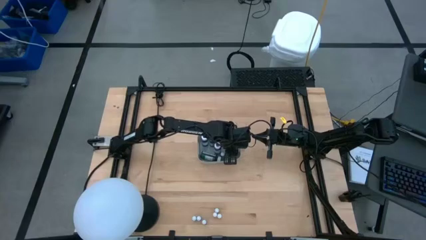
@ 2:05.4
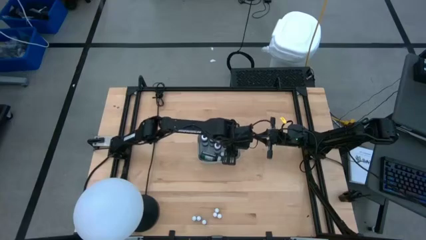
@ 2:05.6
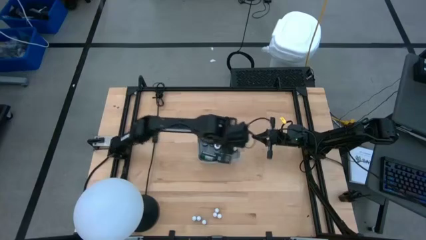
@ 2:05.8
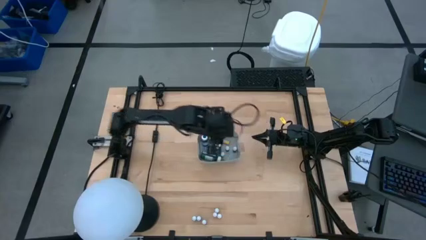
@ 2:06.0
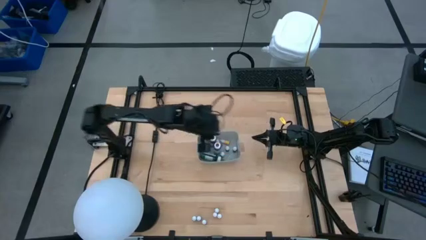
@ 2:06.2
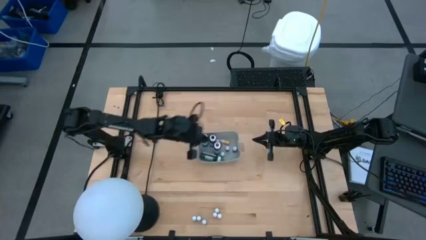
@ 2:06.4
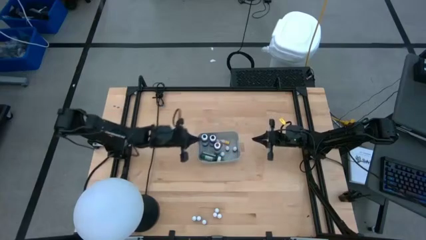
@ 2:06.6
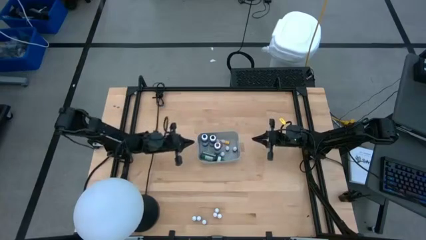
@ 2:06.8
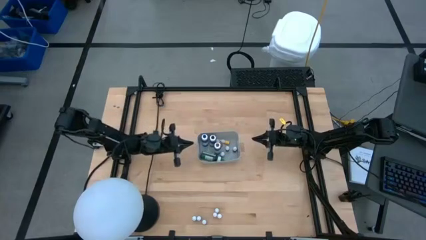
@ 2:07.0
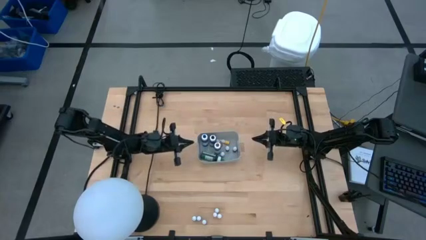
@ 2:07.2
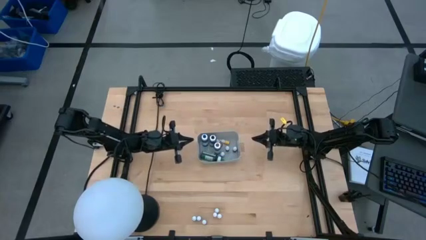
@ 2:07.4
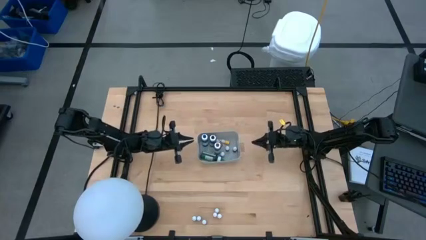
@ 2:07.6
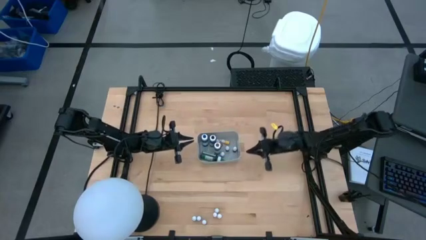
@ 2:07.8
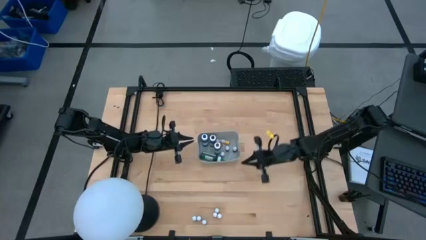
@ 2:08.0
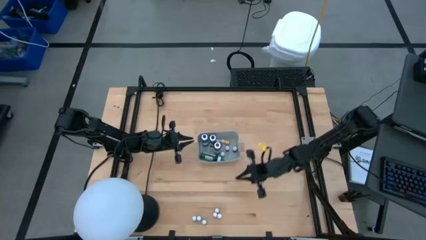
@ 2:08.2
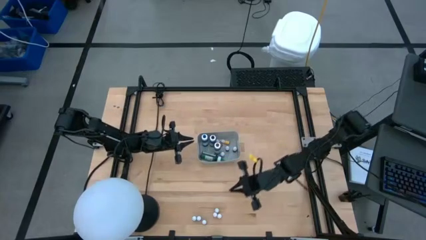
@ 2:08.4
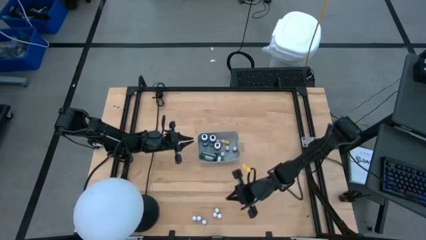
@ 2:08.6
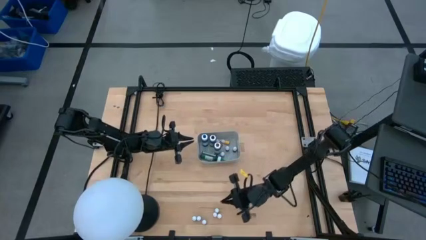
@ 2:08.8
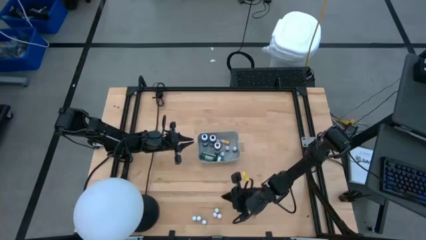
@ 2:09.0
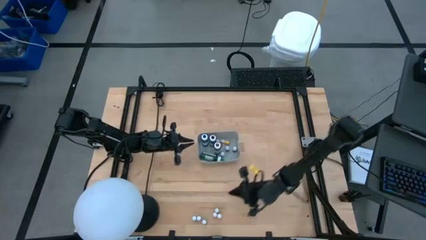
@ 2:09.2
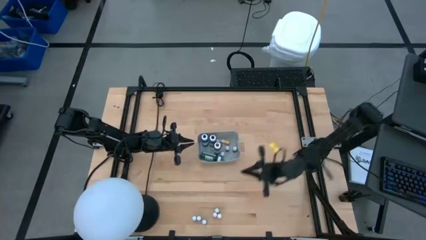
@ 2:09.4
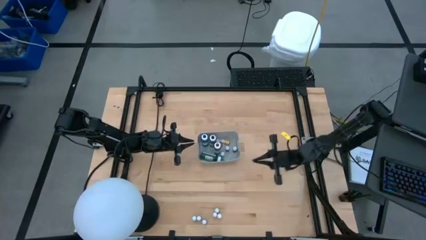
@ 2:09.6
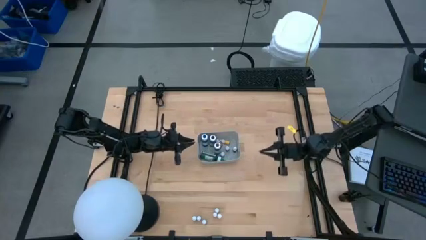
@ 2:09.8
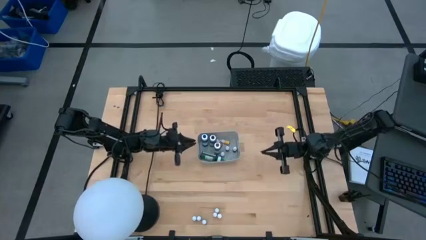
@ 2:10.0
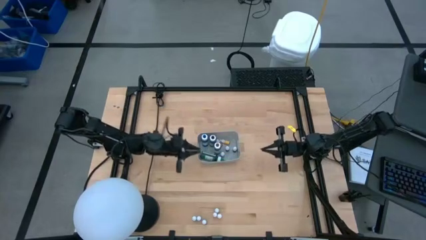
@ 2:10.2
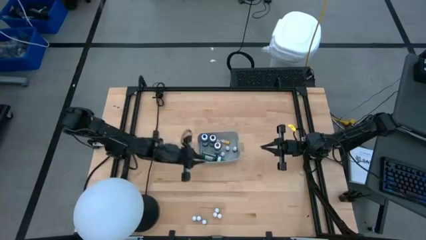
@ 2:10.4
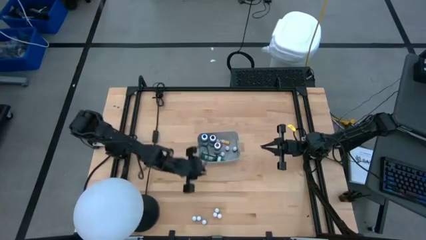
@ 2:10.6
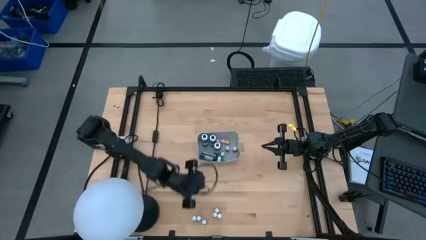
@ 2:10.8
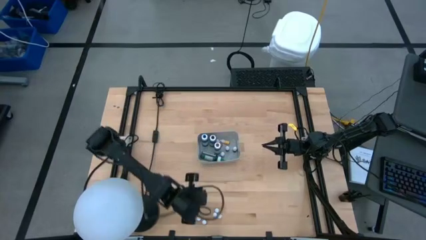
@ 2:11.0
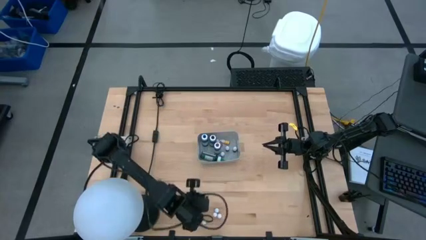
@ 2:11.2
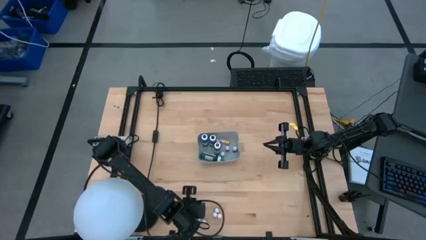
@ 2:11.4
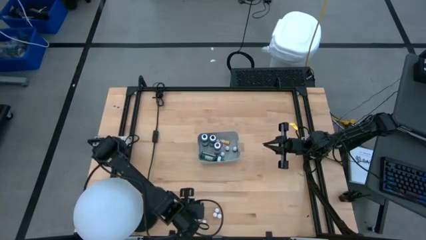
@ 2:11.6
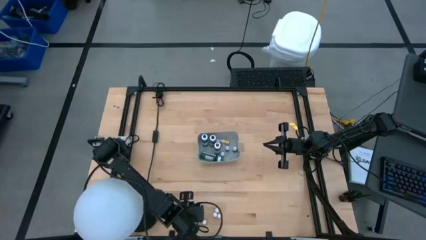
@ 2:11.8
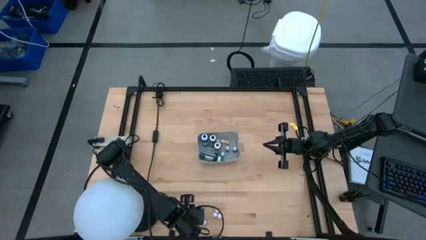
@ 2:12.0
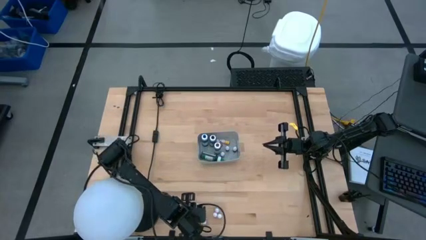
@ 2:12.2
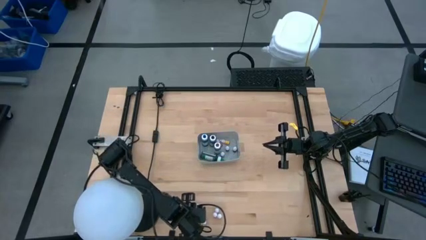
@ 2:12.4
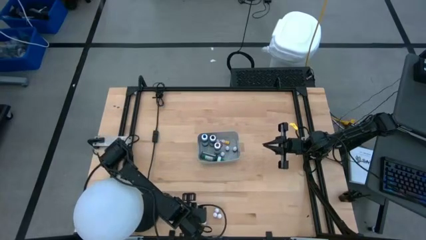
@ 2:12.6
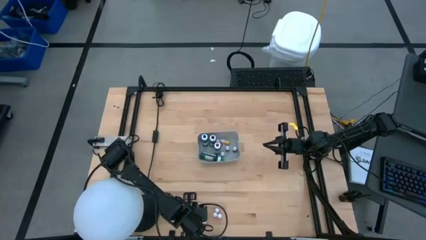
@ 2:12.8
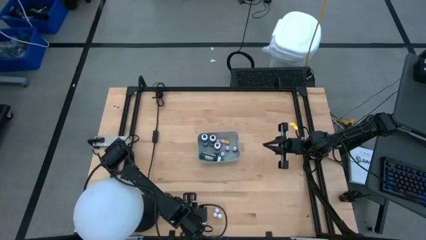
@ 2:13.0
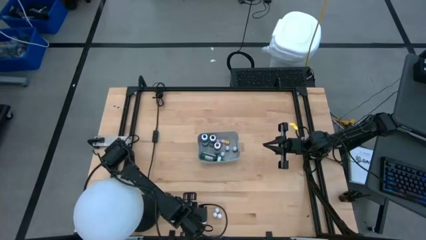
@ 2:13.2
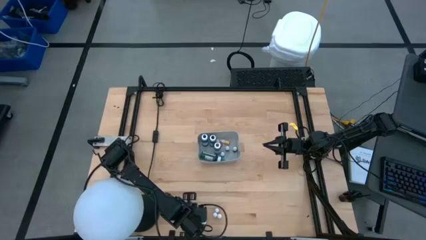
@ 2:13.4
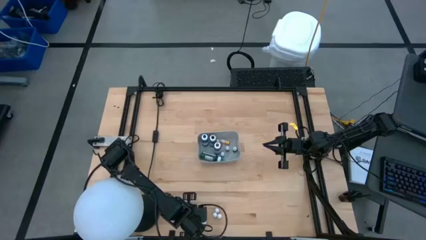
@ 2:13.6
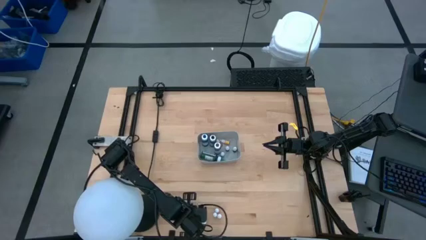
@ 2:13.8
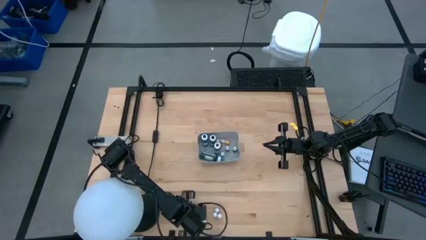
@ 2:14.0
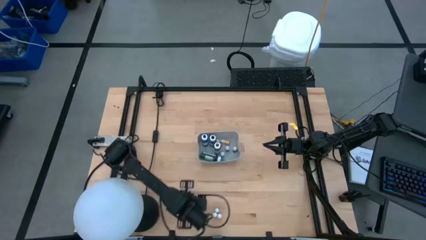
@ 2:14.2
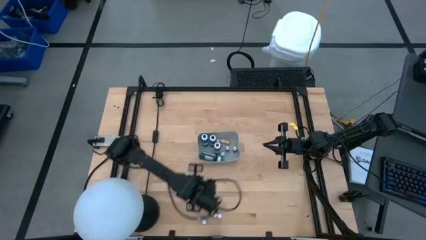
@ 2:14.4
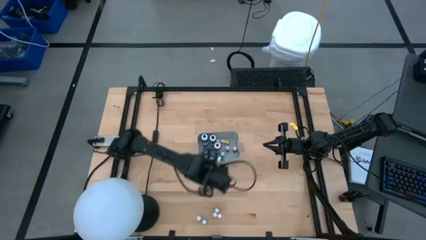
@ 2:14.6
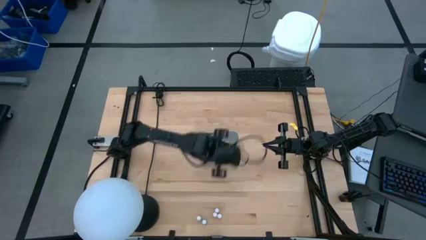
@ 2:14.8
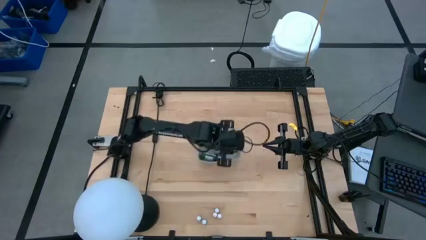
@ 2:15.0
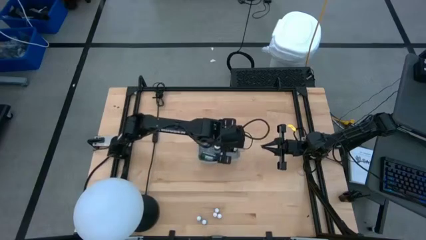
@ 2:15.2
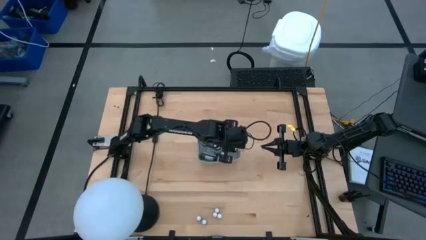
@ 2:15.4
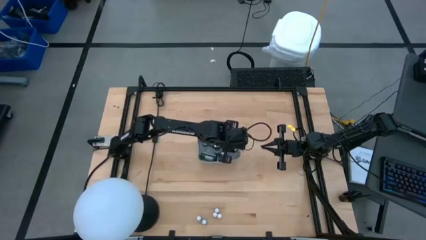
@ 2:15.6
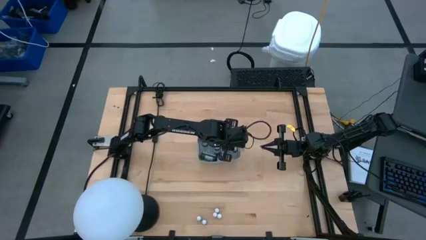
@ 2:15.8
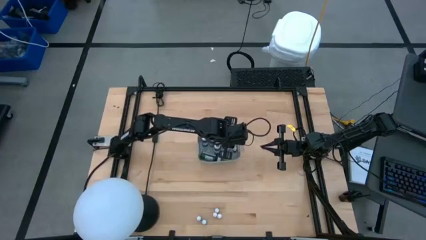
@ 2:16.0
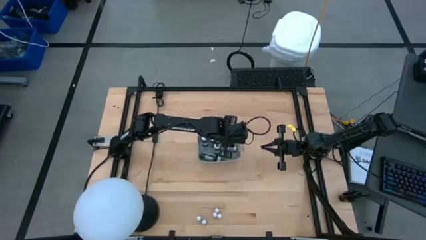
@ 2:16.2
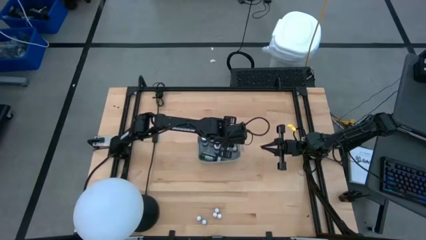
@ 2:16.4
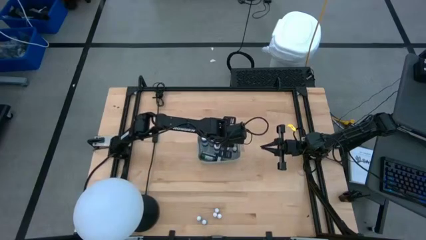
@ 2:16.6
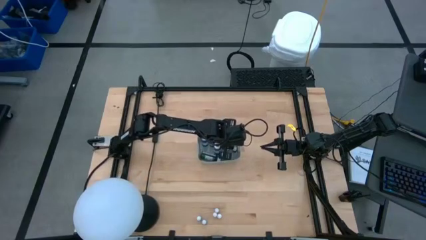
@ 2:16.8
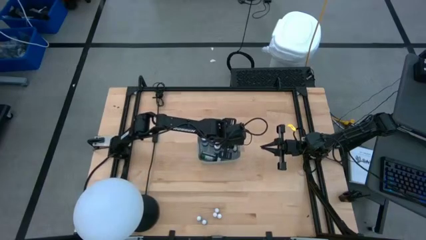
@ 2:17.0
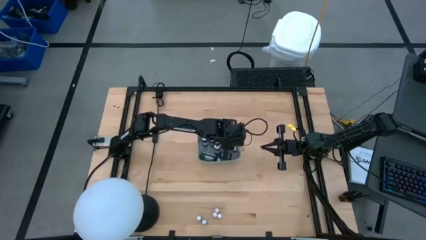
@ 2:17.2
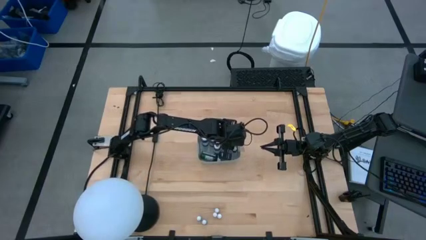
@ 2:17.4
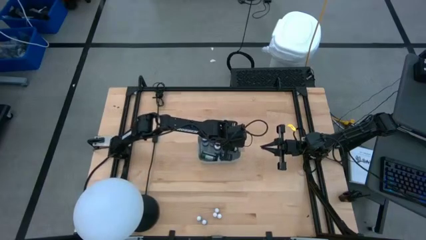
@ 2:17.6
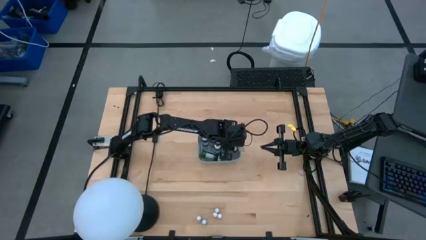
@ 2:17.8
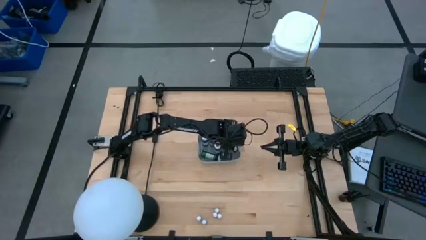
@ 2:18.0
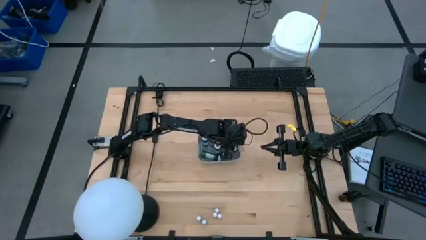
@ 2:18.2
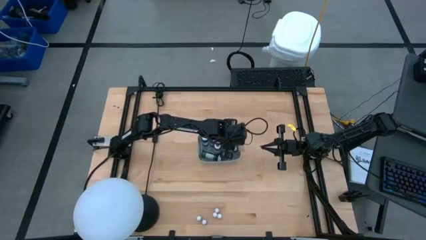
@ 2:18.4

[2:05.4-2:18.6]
Task: Pick & Place food coloring
Put the small purple food coloring bottle into the gray bin

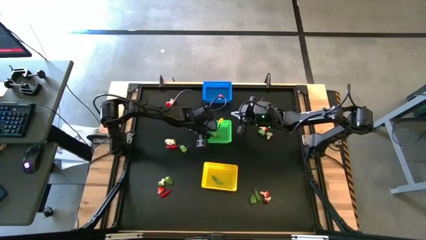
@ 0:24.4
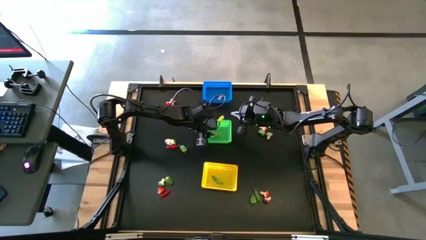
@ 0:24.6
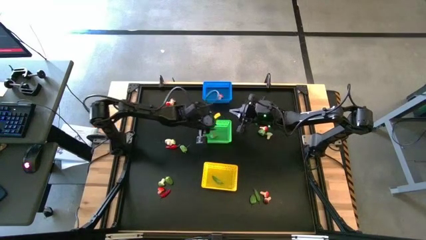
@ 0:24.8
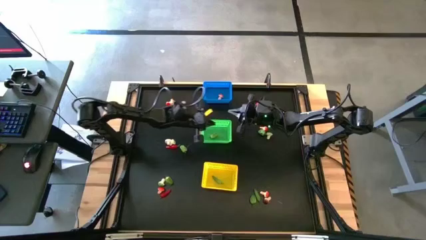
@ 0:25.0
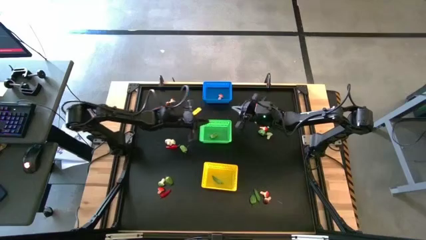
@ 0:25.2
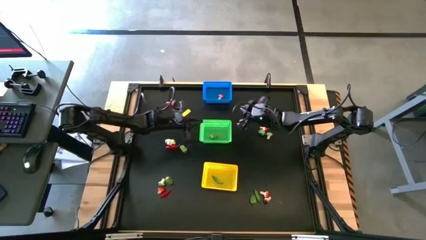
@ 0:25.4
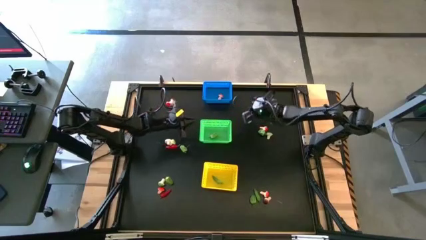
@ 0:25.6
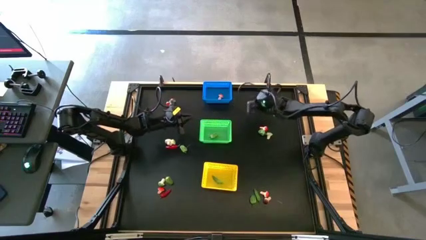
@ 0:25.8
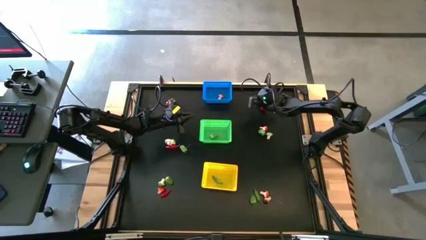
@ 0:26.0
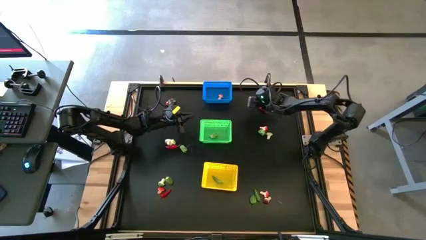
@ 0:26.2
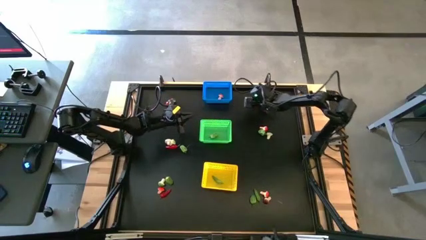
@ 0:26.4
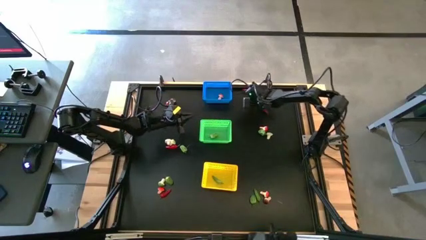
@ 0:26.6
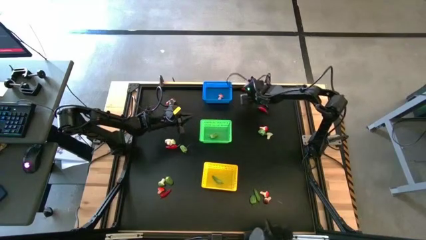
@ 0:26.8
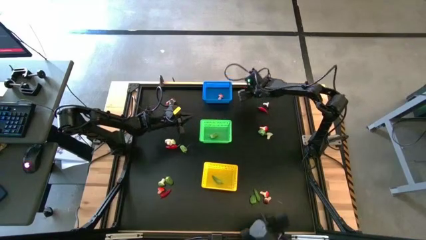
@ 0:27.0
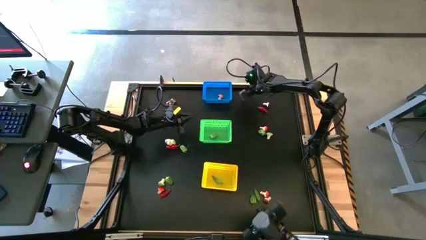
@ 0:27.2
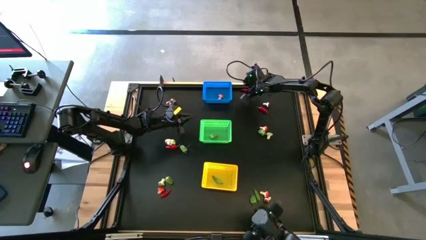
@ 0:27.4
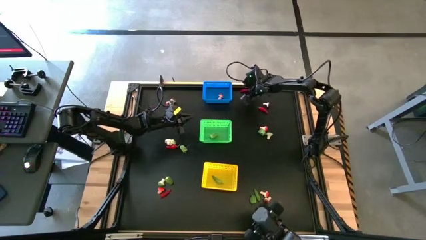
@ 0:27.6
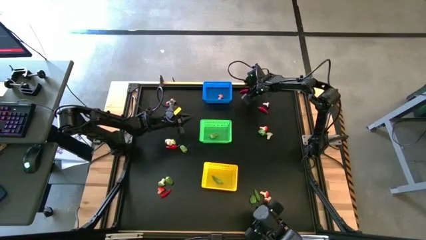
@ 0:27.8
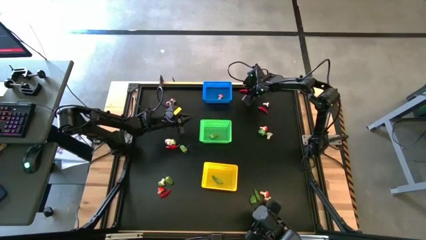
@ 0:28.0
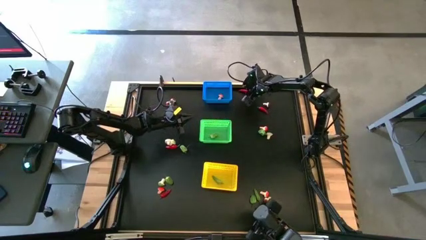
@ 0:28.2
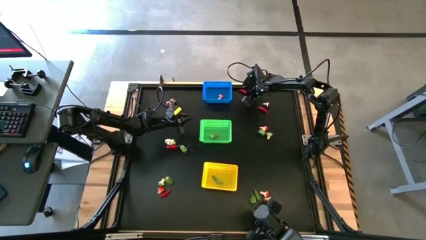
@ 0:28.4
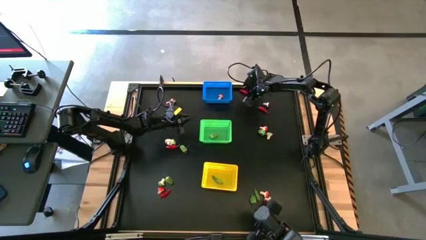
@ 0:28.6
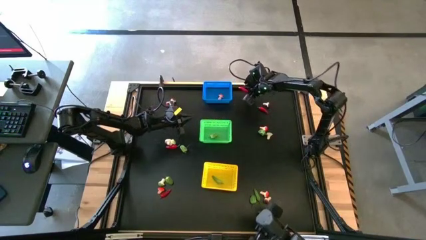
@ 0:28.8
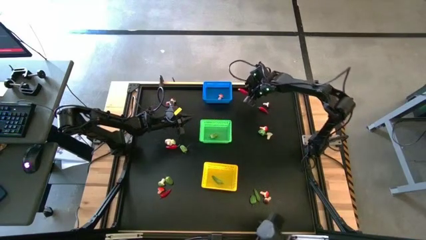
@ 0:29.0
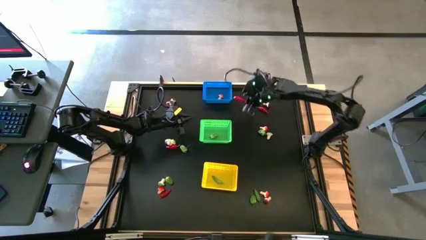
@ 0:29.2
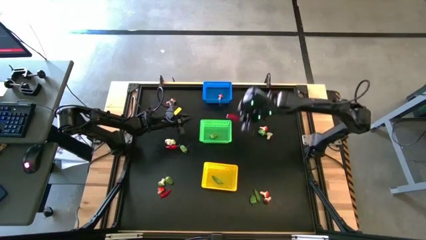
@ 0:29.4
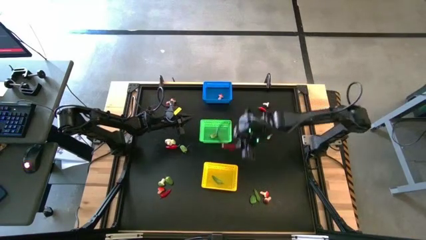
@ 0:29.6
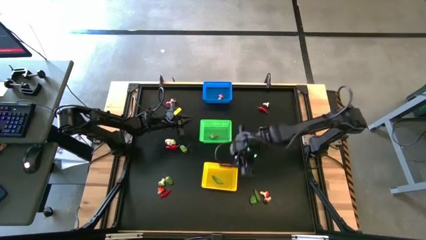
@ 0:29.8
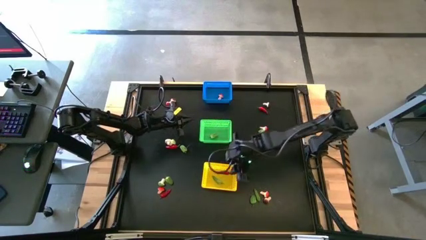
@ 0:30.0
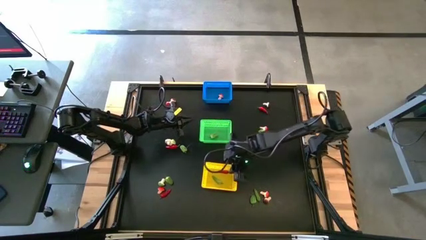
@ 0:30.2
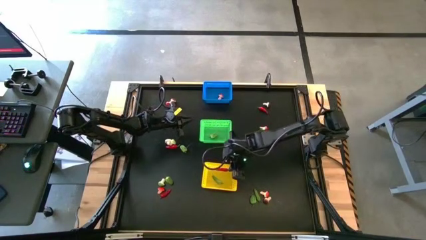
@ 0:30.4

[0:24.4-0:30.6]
Task: Sort produce into baskets
Put the red chili pepper into the yellow bin
